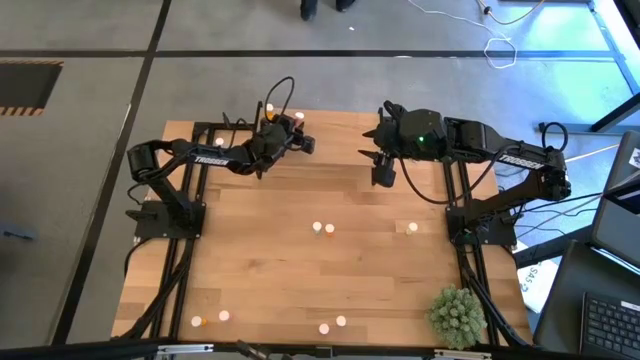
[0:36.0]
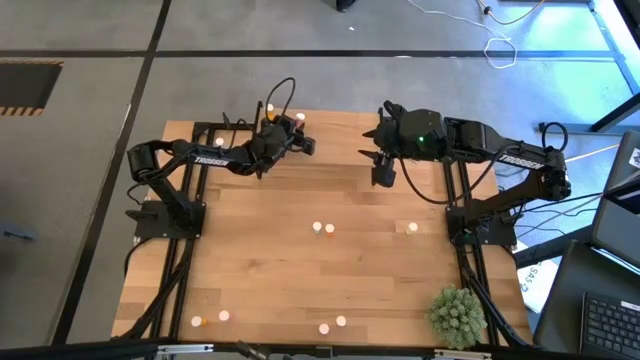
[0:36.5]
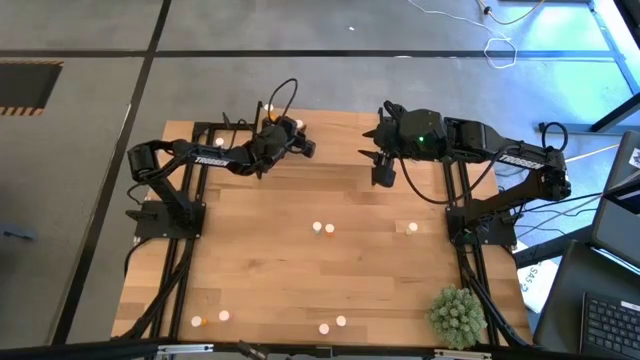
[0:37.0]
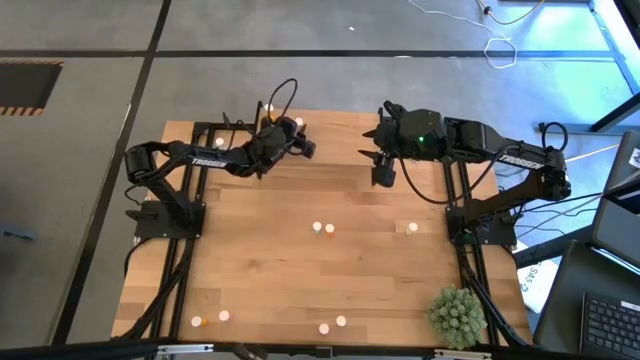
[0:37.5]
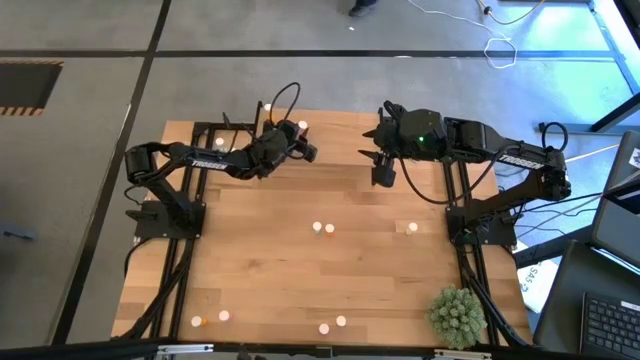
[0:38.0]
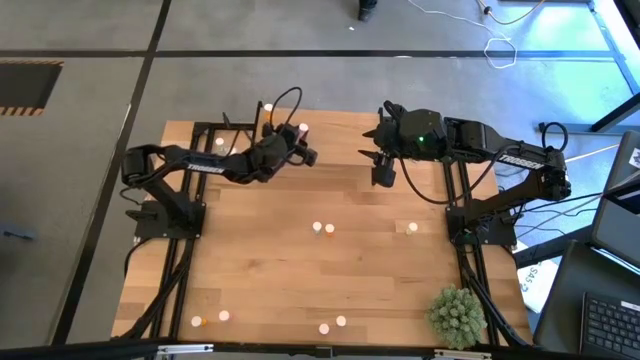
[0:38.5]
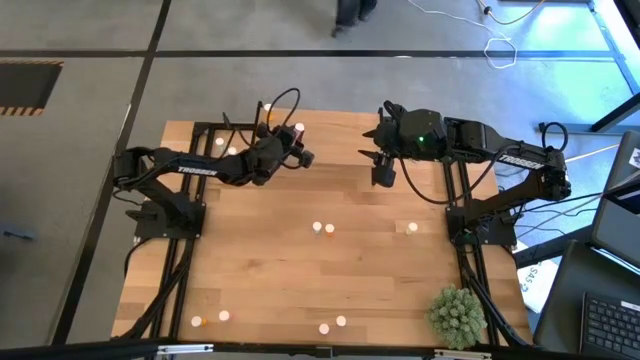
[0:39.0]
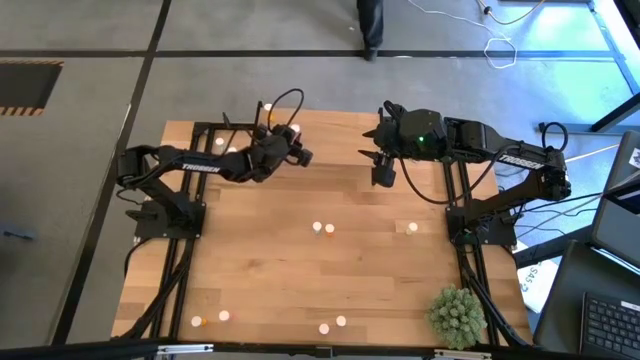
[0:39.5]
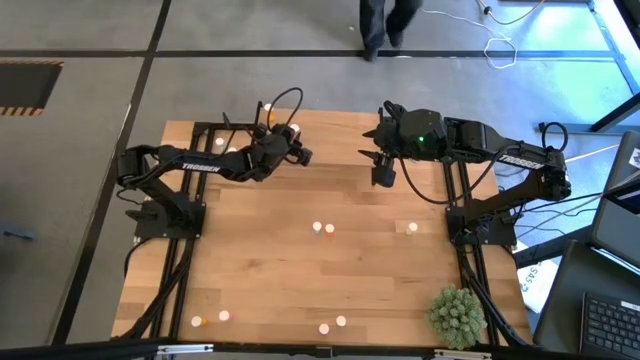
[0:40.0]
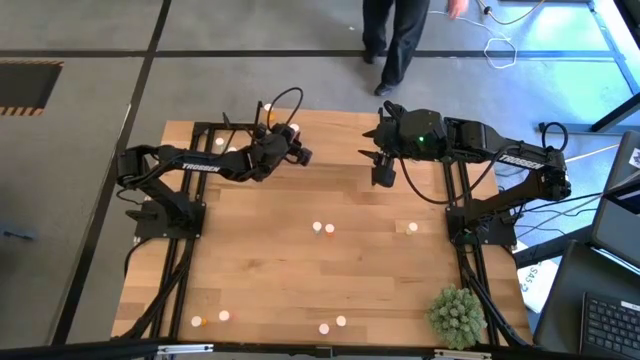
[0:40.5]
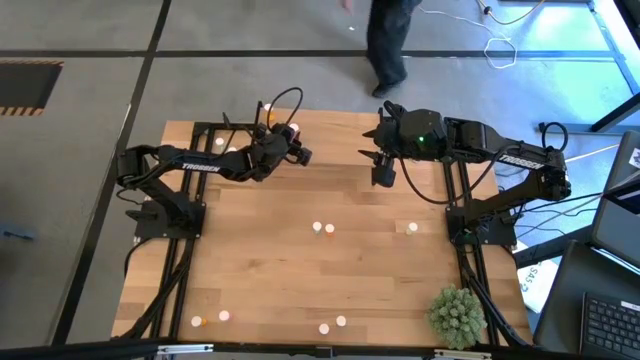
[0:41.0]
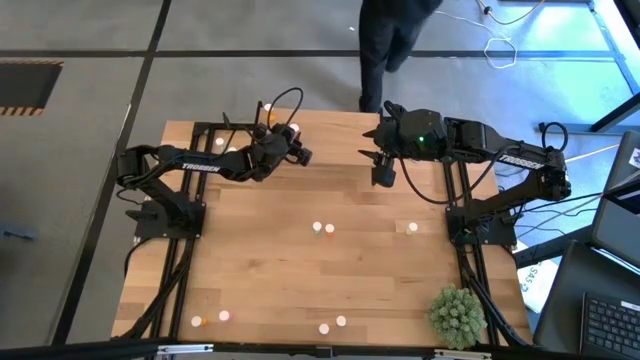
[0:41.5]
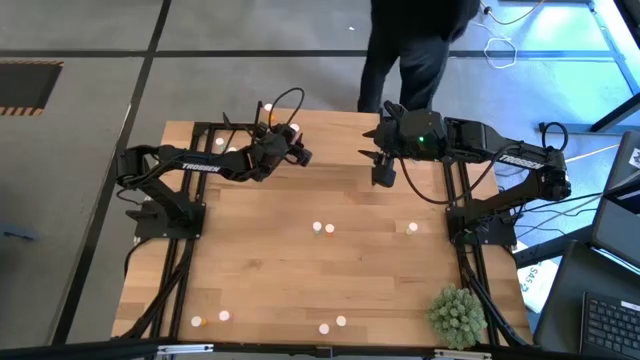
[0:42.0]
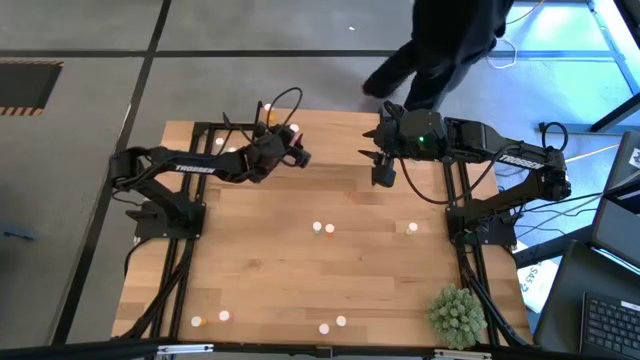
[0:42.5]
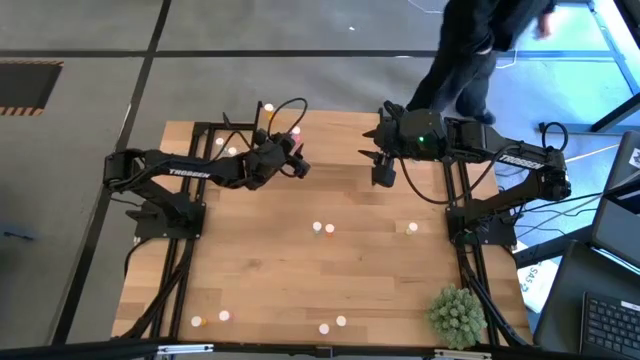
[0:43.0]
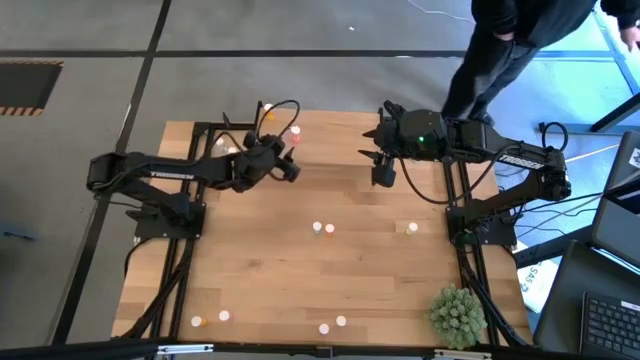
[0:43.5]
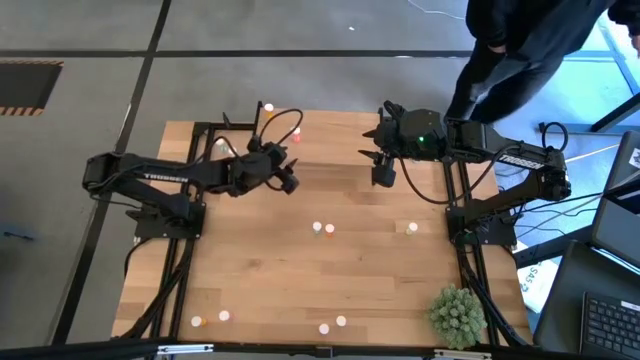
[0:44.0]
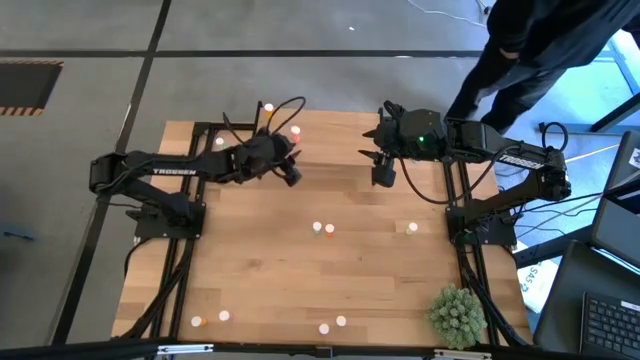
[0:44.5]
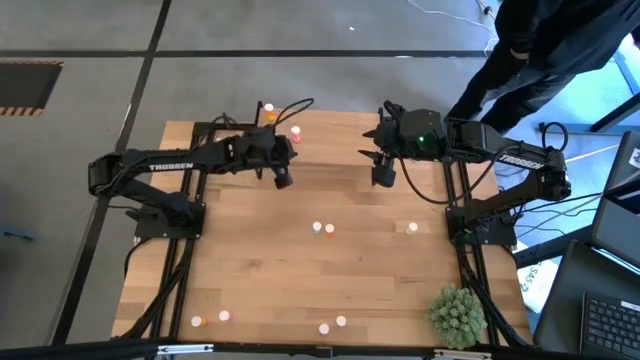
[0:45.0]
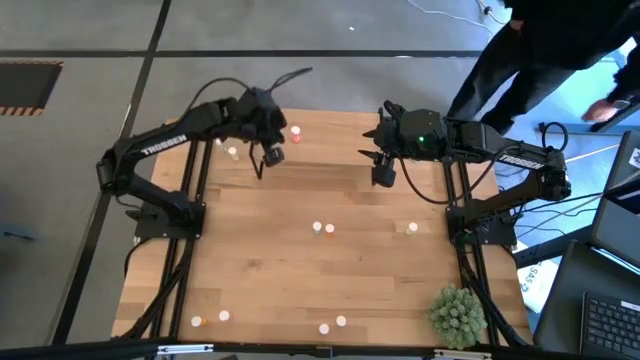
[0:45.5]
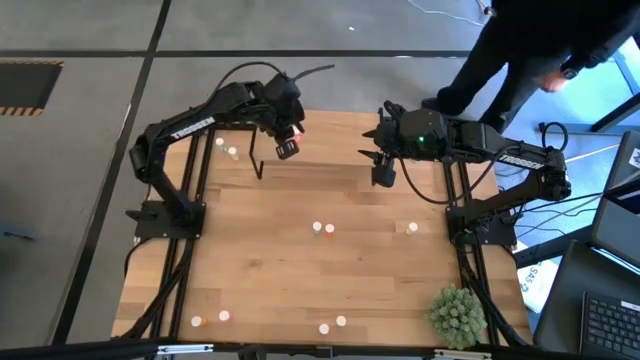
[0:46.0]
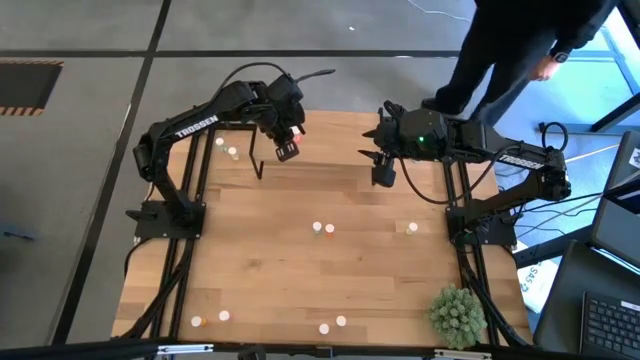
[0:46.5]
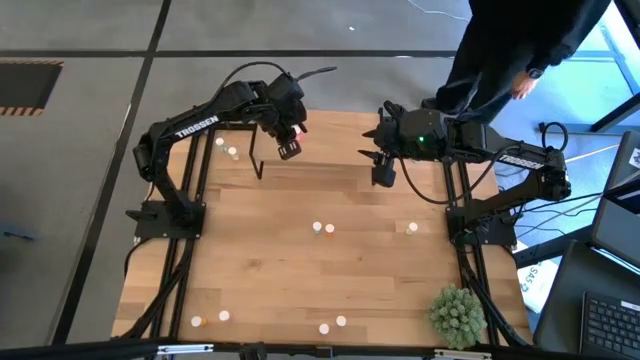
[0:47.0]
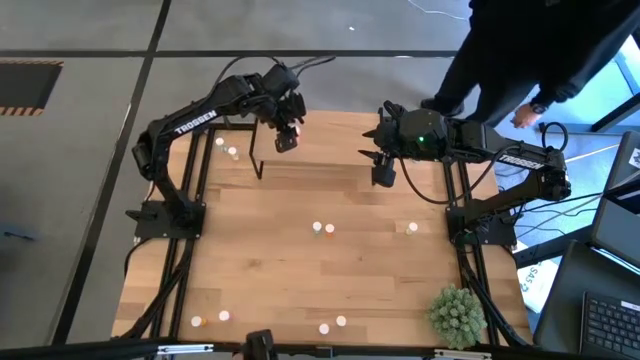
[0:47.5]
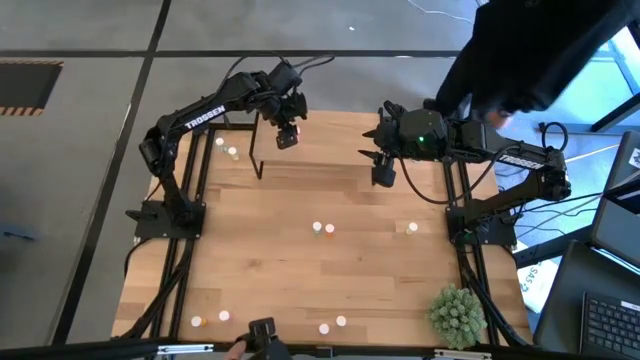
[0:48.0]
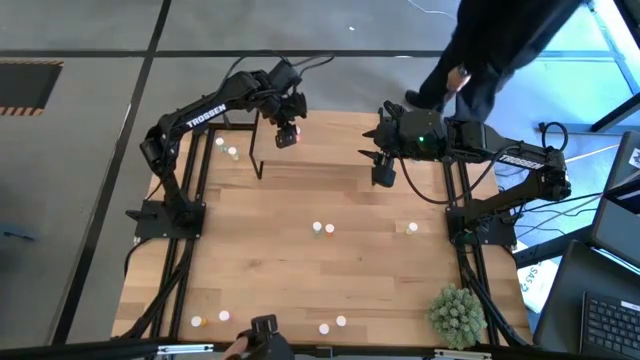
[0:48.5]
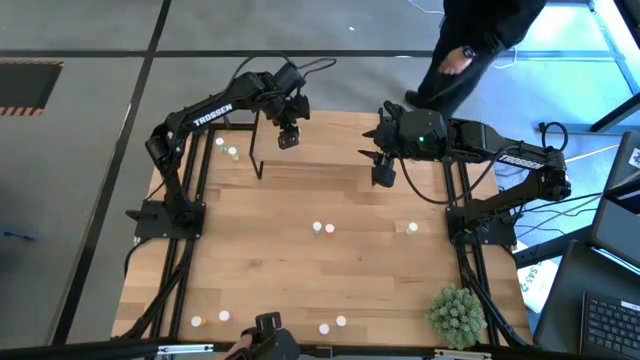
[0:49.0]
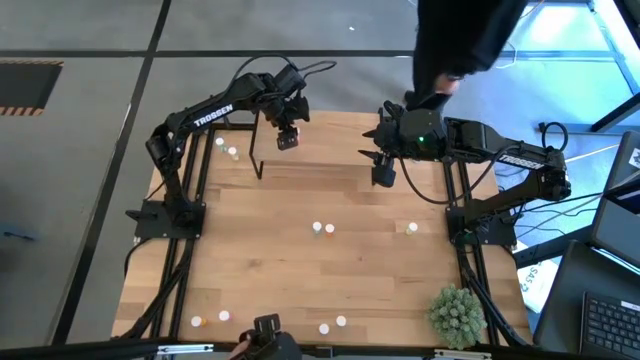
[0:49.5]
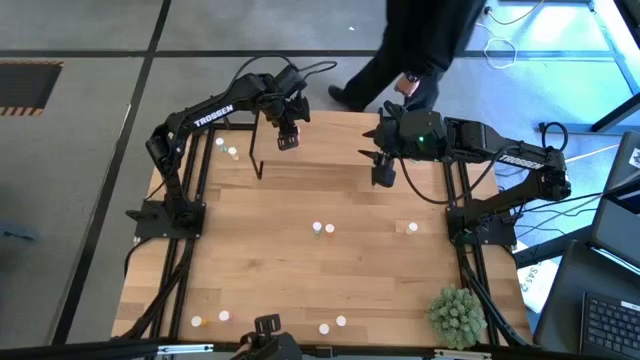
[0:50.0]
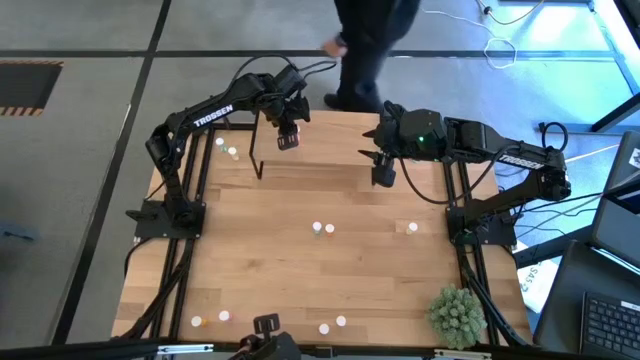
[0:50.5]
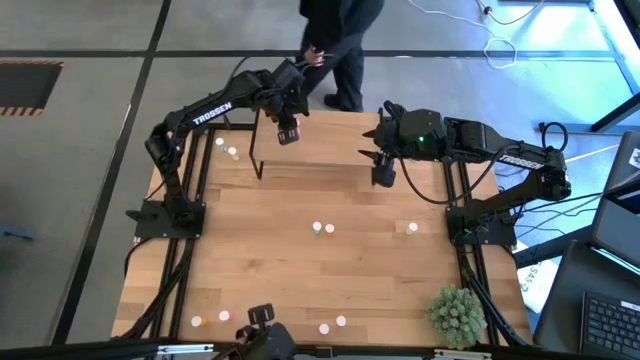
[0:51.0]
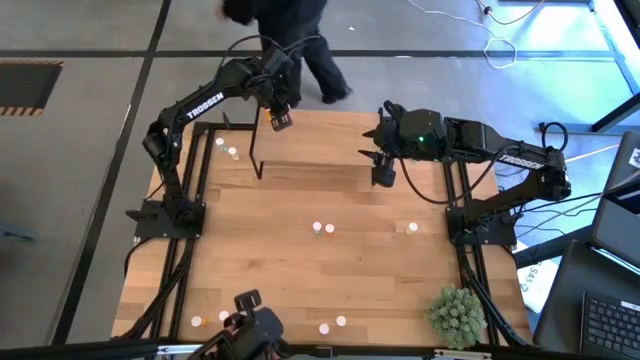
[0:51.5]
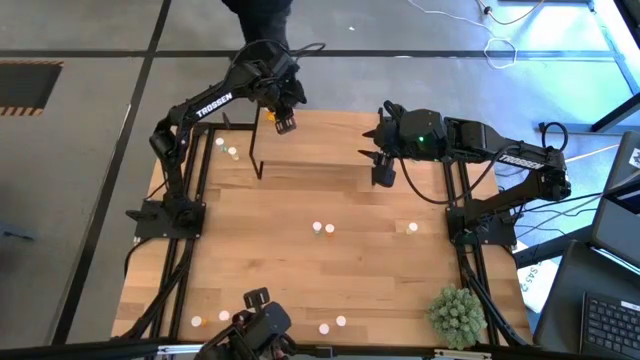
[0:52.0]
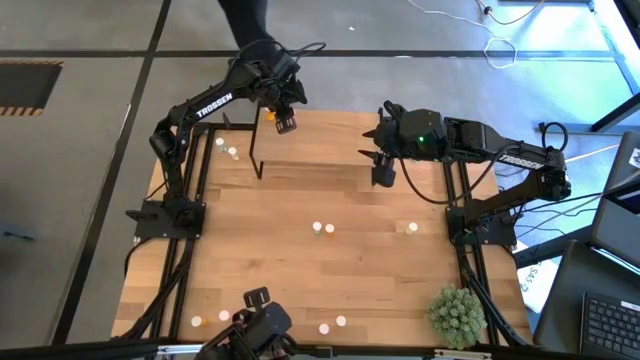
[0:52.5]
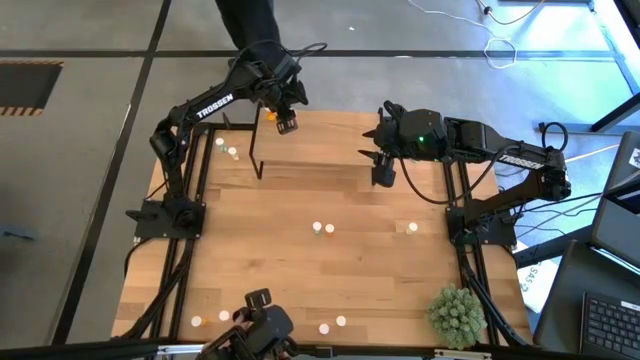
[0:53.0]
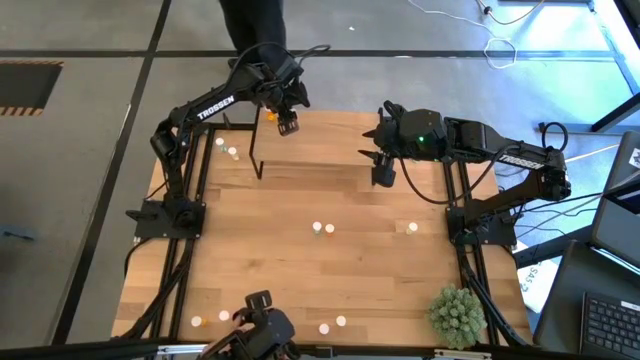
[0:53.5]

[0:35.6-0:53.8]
Task: Pick and place medicine bottles onto shelf by color
Put the top right pink pill bottle on the shelf
